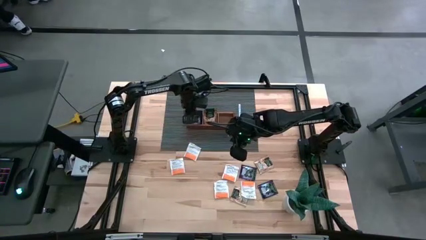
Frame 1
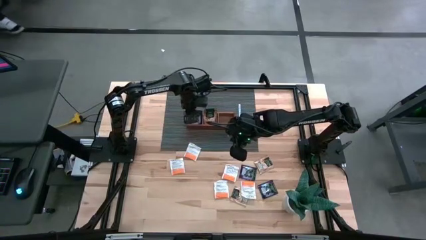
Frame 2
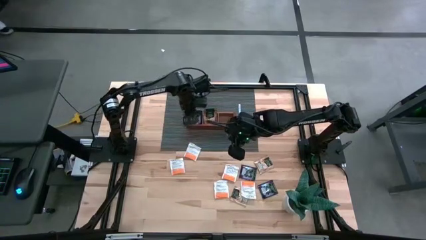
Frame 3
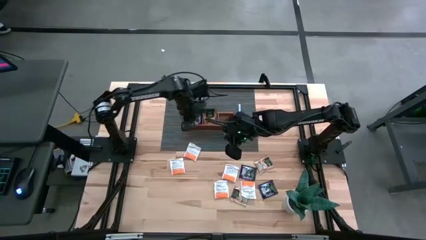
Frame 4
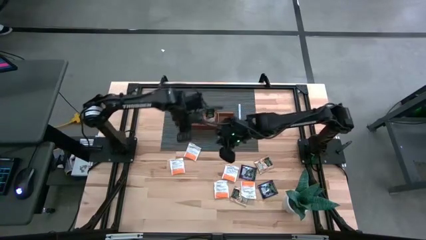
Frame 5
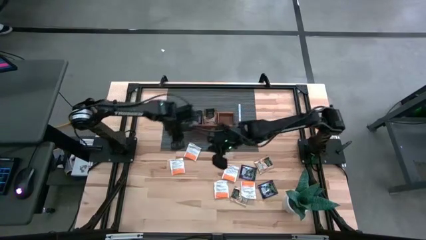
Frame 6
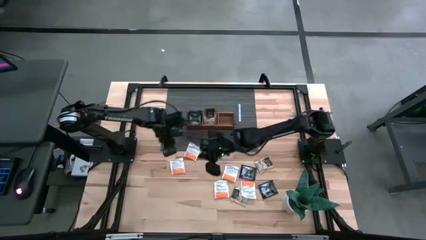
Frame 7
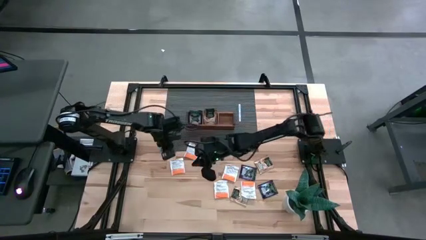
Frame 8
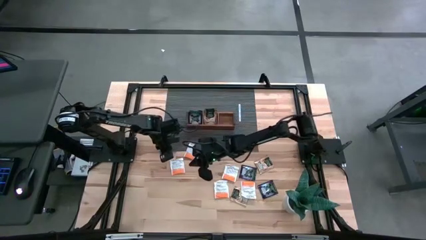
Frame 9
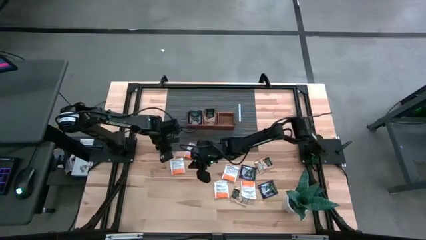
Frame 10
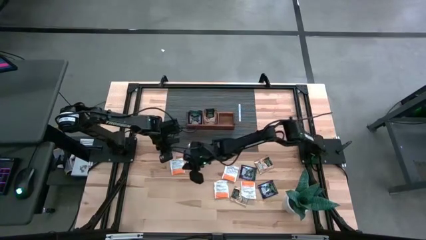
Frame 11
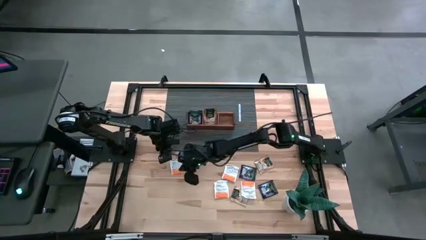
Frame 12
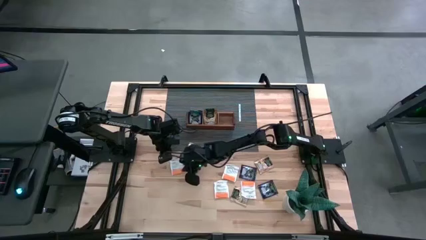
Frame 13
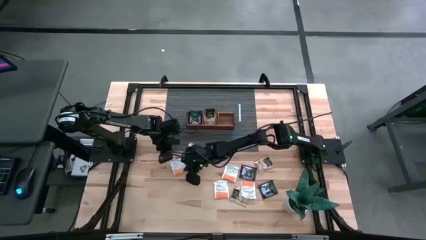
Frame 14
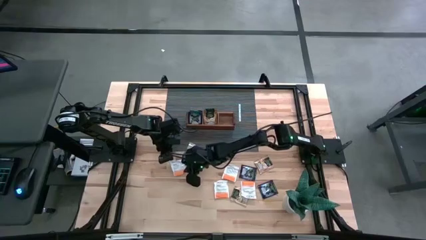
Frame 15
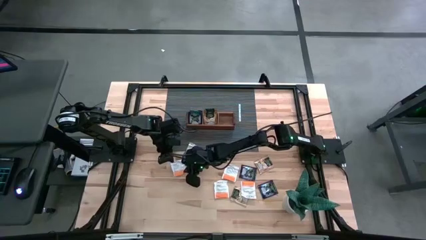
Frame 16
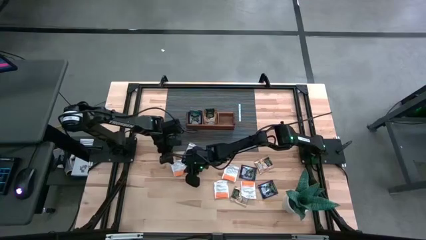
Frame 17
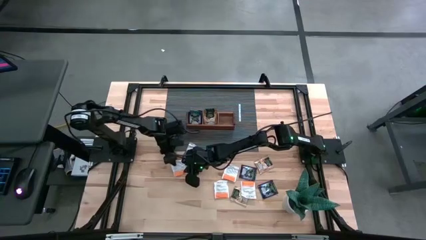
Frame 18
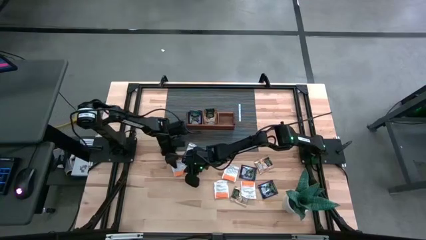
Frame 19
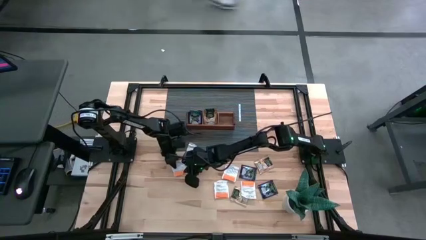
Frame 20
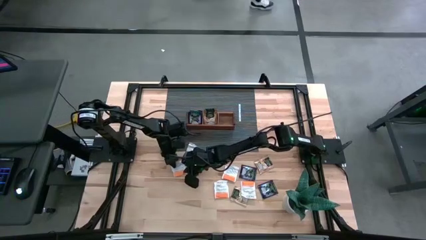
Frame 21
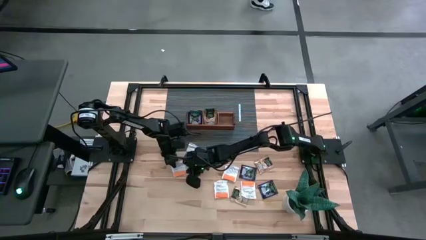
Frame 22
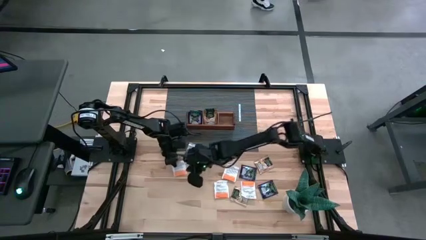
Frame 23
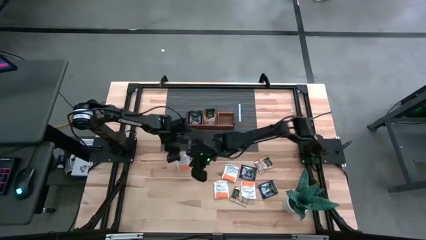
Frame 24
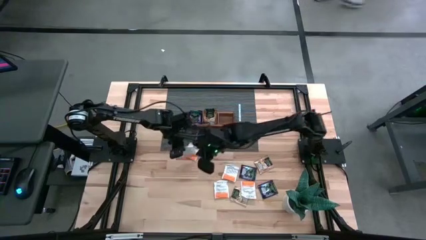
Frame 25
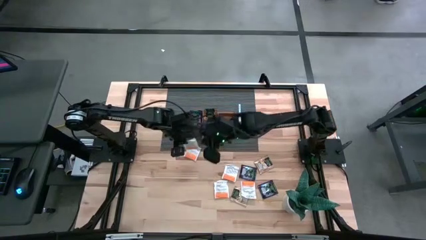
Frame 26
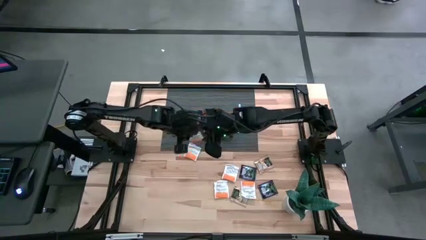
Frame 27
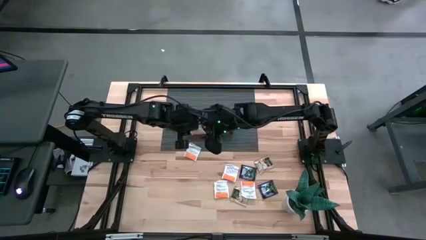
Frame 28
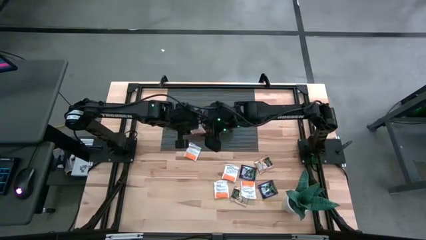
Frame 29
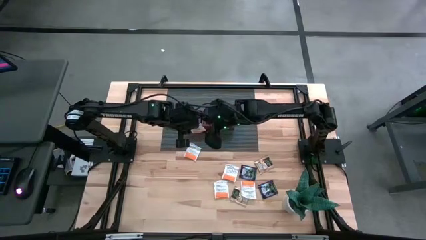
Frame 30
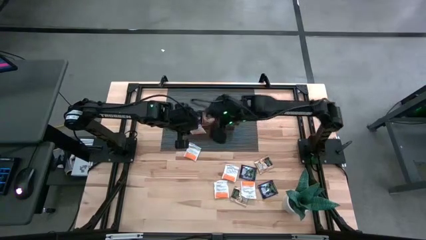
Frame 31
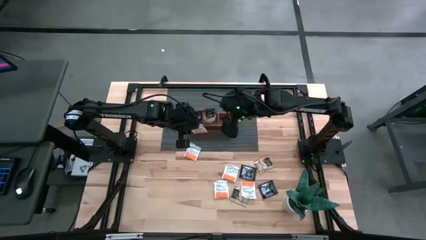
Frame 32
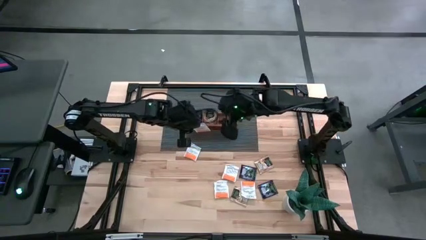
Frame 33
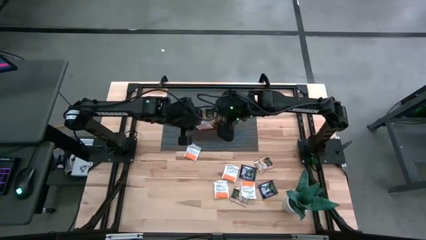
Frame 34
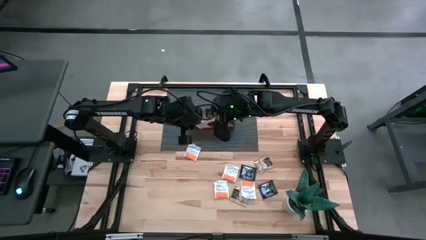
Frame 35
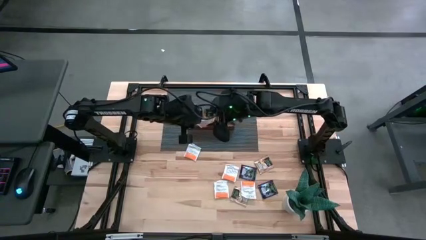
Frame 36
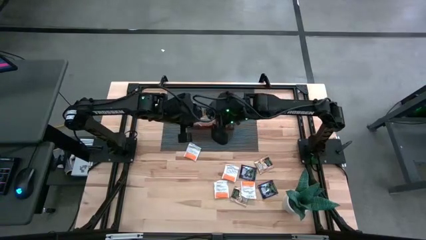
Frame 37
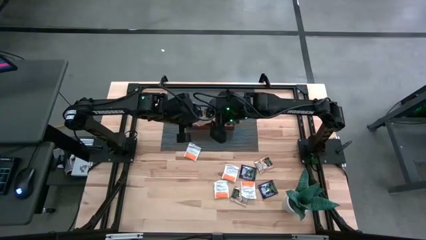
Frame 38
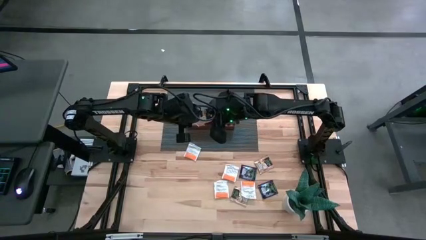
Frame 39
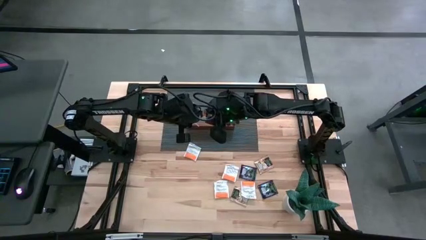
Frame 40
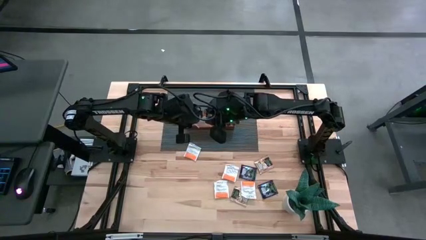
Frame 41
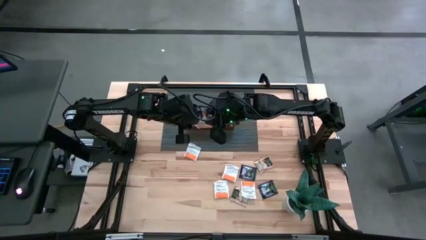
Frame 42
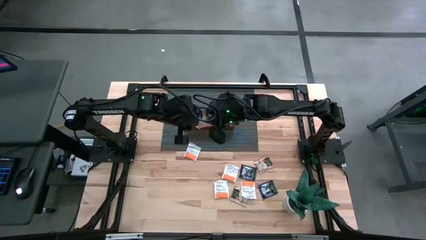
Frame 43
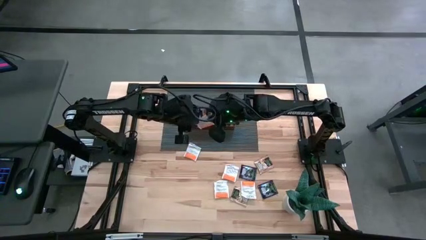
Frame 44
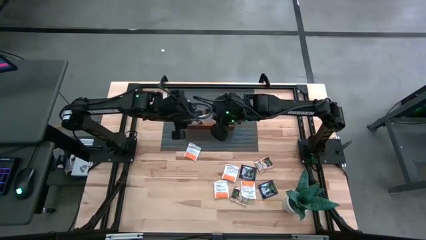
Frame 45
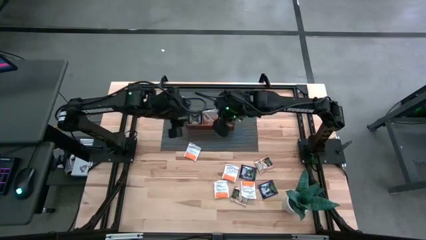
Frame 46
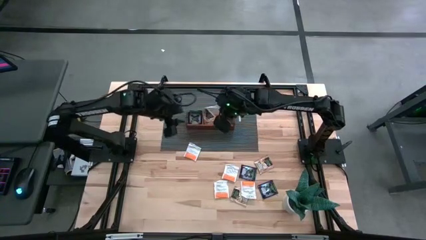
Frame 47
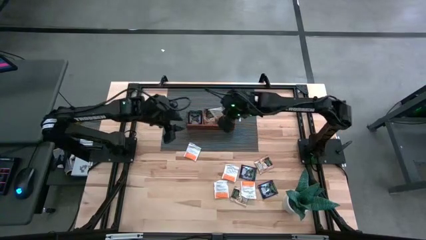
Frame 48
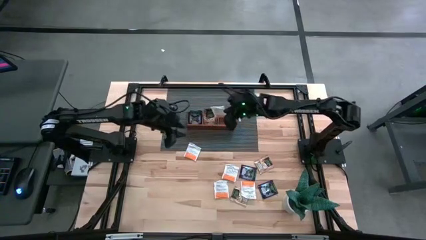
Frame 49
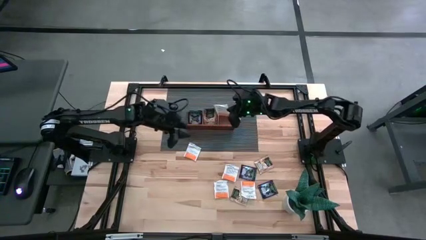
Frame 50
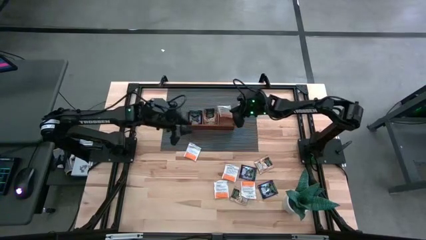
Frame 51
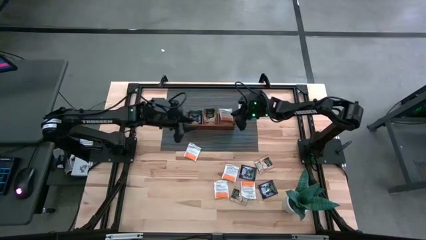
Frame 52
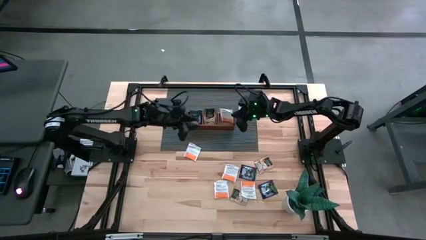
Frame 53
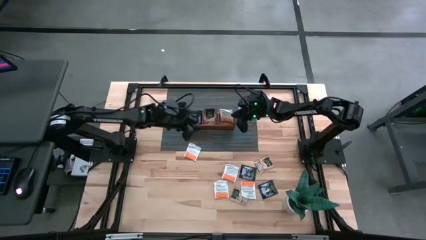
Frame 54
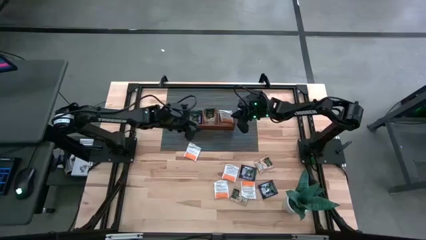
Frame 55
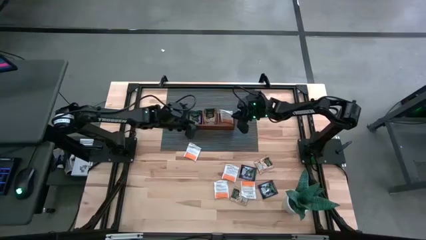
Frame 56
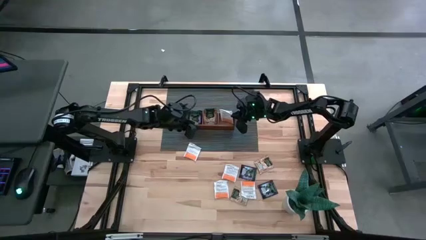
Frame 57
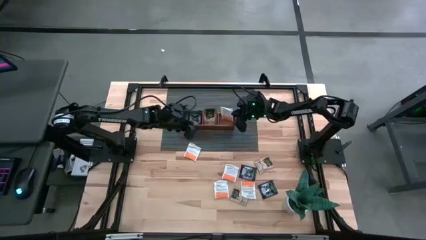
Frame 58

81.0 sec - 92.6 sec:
Task: Pick & Place Tea
Put the orange tea bag into the right section of the wooden organizer

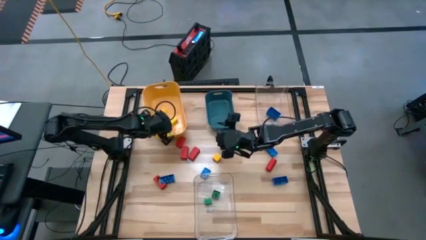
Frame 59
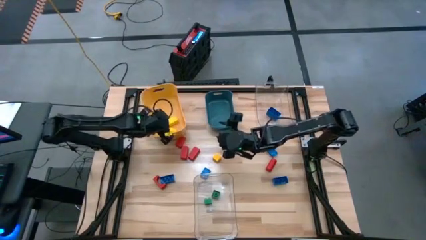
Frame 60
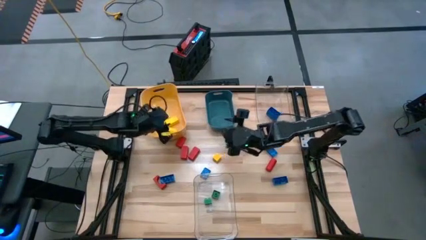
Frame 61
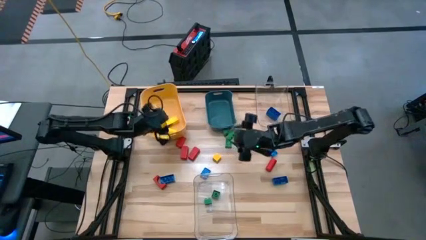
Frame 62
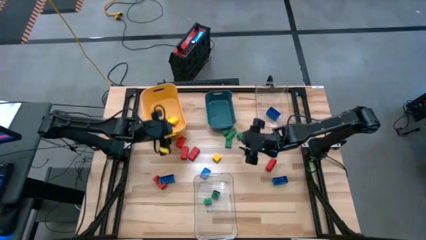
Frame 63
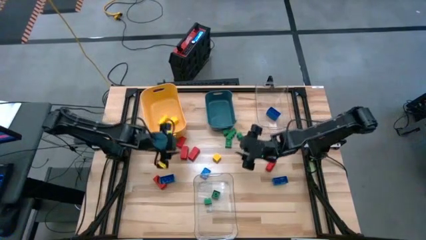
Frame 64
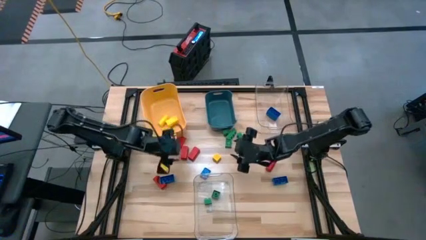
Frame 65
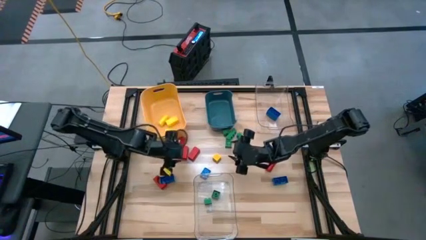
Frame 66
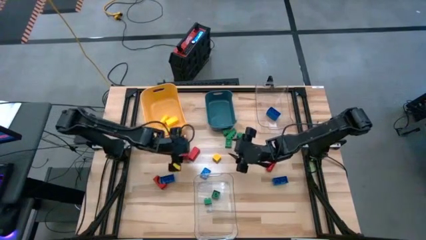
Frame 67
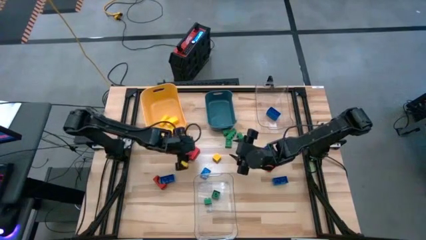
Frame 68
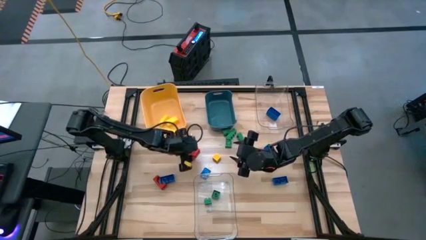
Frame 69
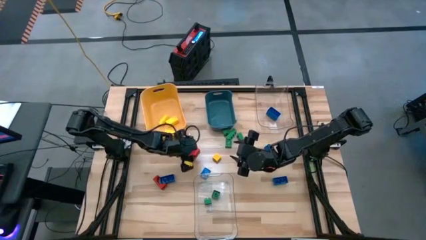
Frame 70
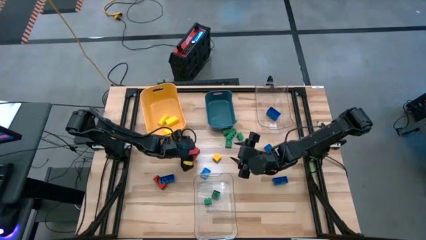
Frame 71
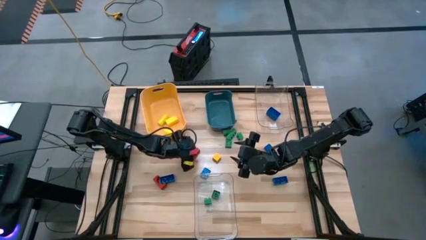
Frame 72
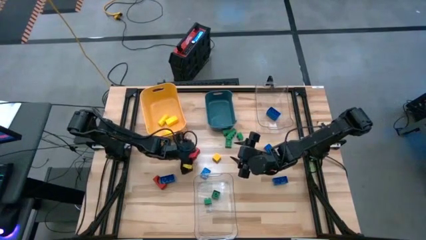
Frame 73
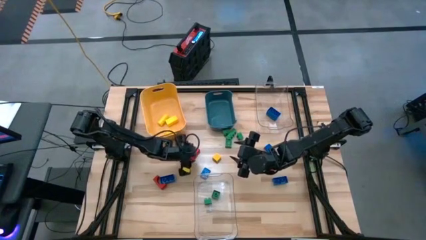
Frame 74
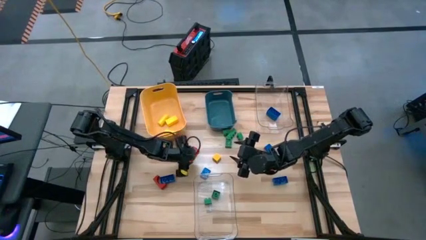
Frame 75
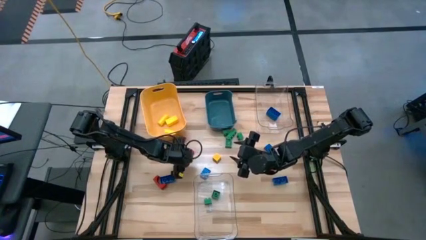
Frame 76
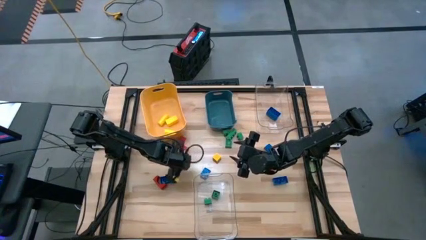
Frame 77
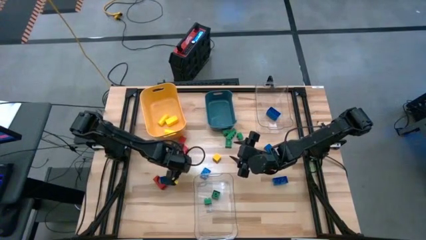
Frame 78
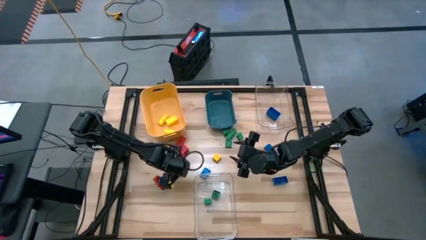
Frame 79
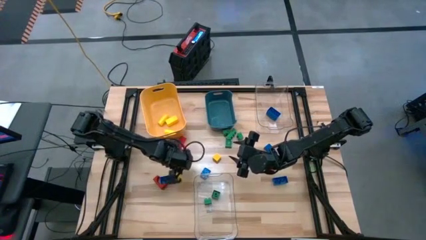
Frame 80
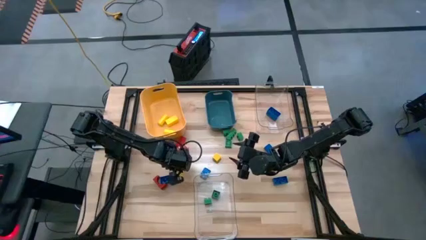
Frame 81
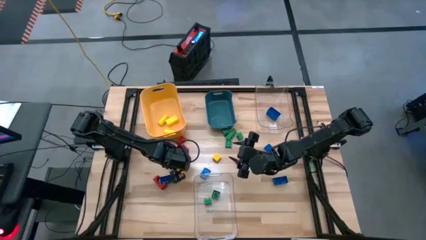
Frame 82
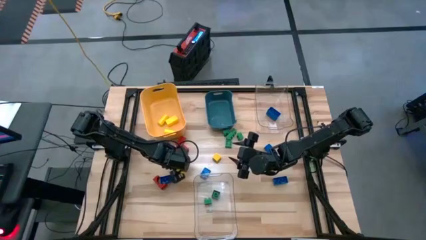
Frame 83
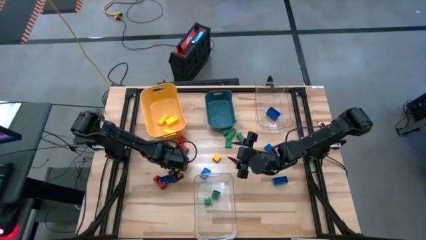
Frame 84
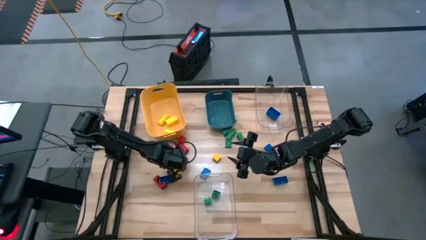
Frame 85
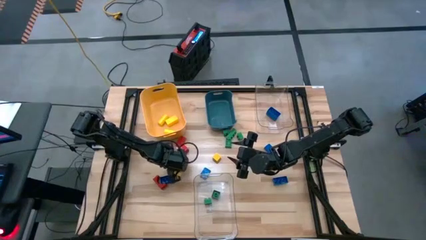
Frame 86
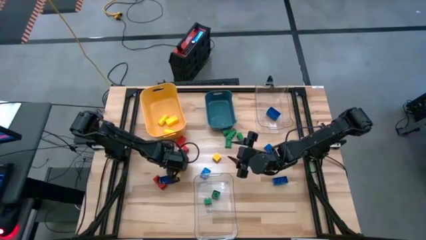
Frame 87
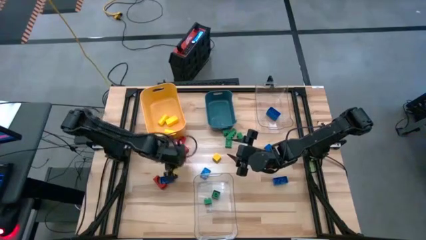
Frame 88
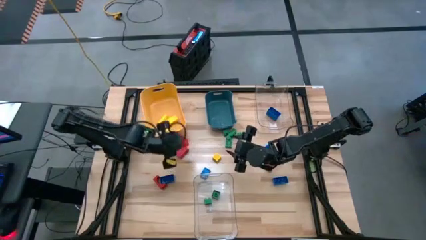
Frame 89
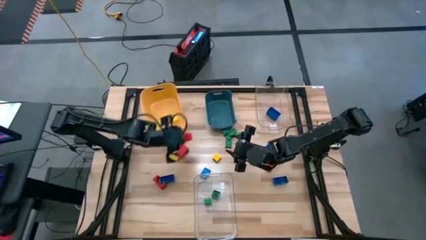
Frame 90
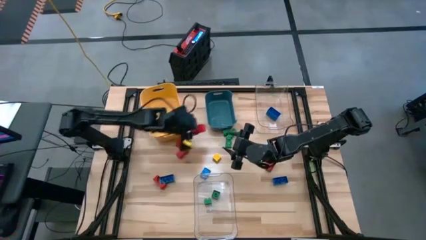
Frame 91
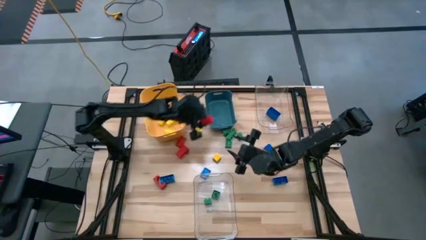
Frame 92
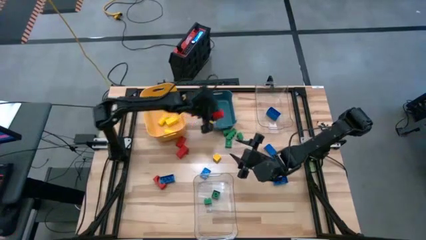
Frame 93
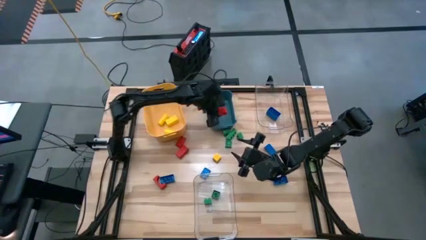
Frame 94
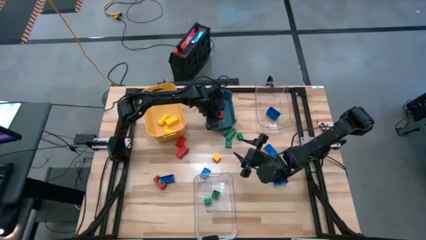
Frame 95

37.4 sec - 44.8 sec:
Task: Sort blocks
Put the red wooden block into the blue bin
